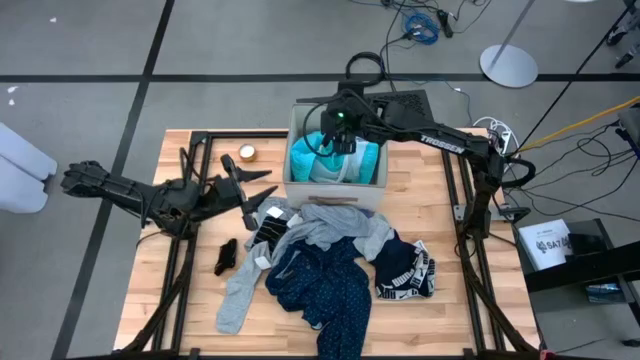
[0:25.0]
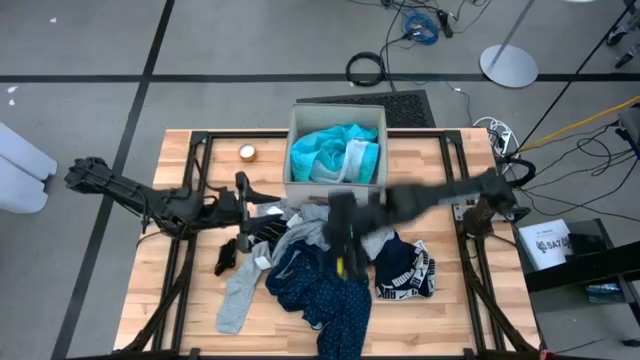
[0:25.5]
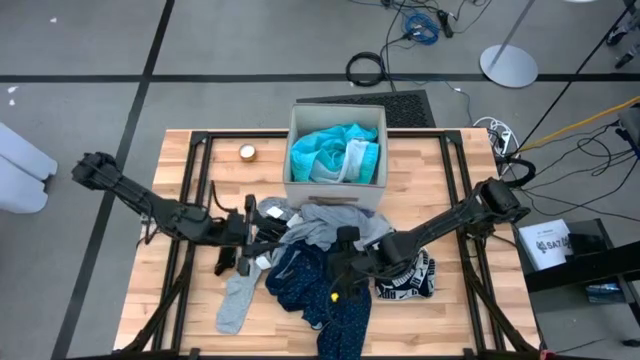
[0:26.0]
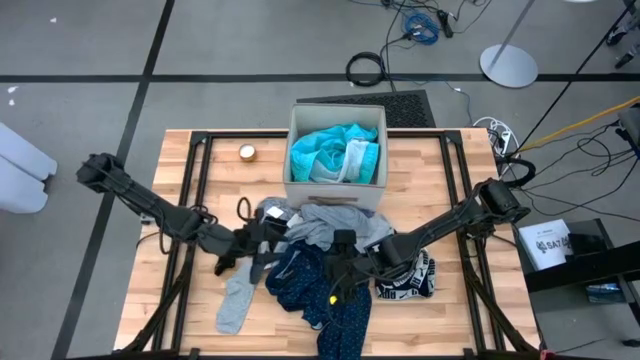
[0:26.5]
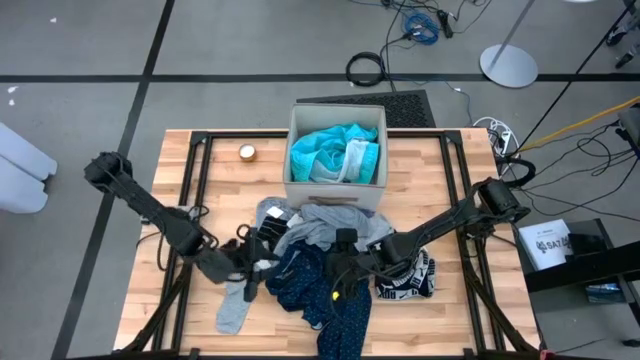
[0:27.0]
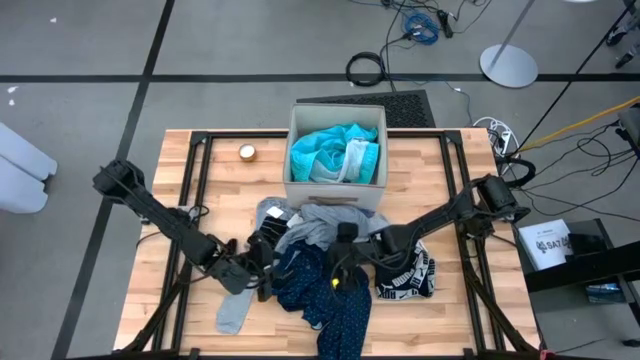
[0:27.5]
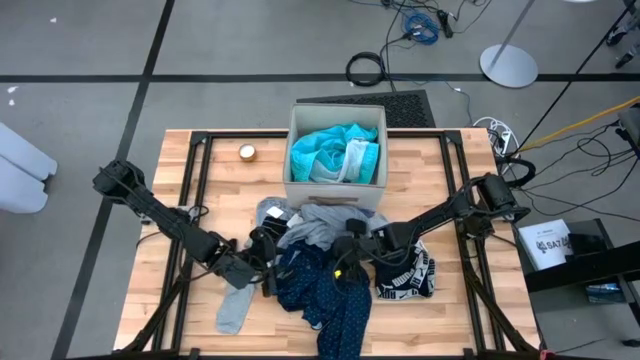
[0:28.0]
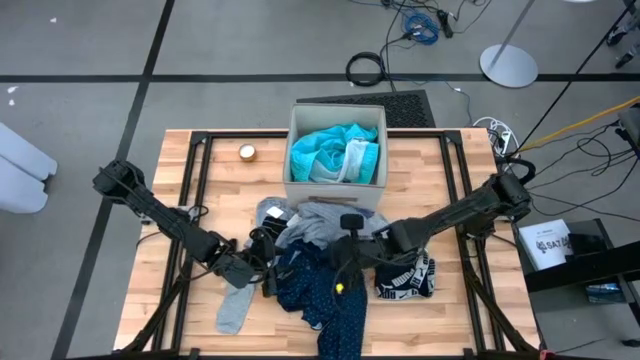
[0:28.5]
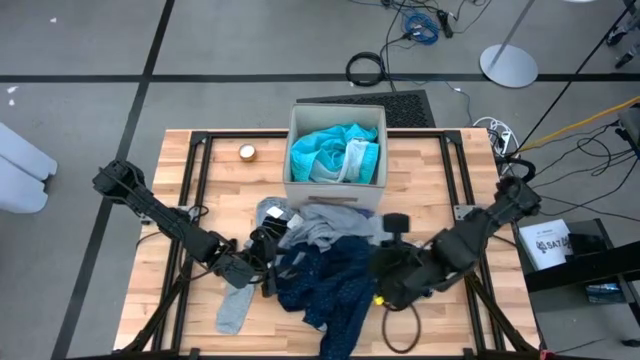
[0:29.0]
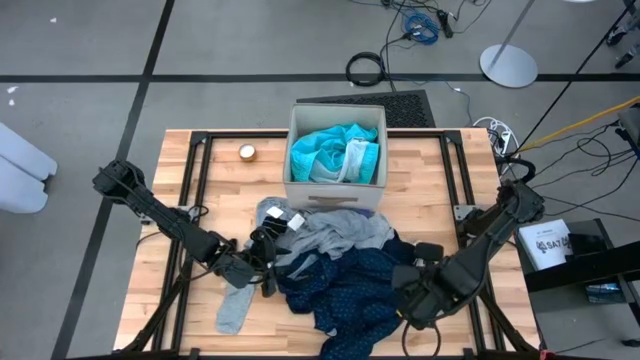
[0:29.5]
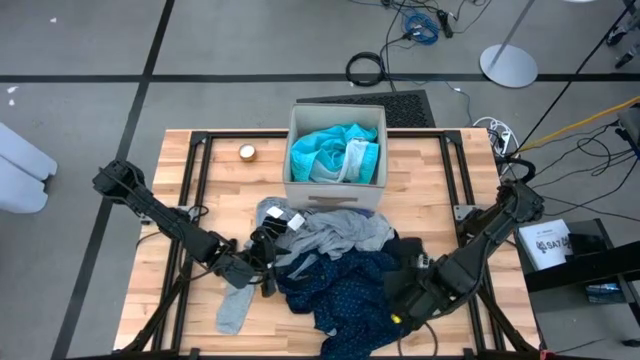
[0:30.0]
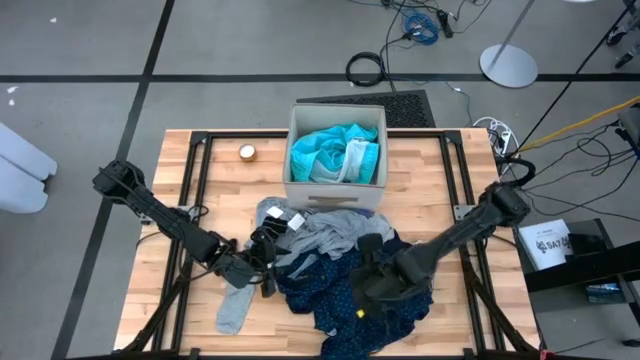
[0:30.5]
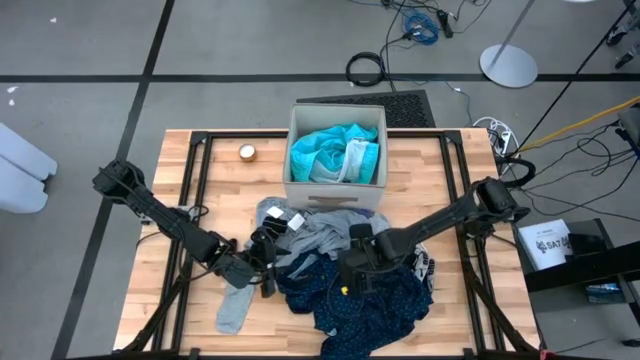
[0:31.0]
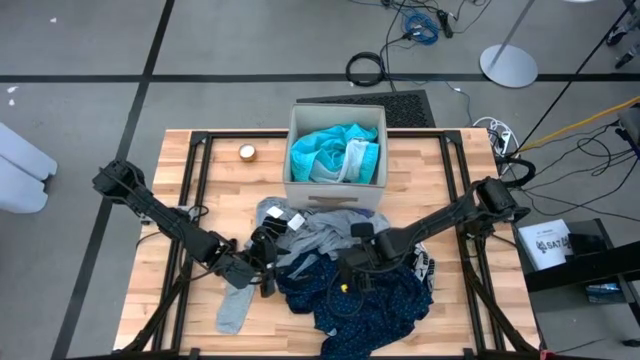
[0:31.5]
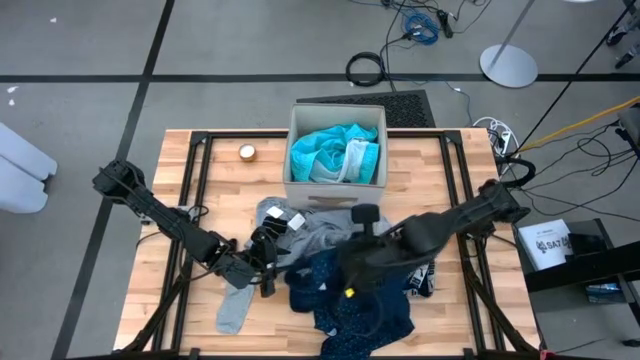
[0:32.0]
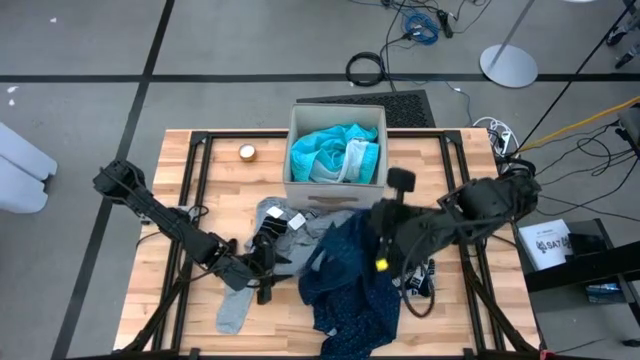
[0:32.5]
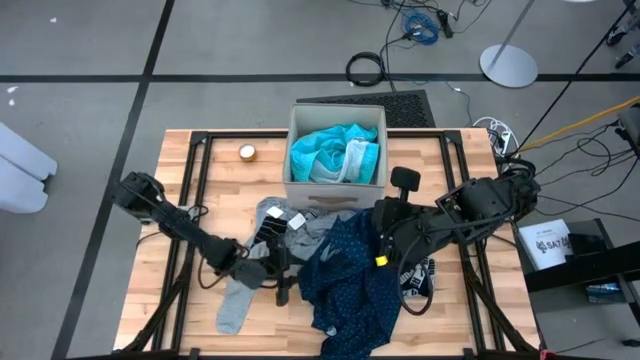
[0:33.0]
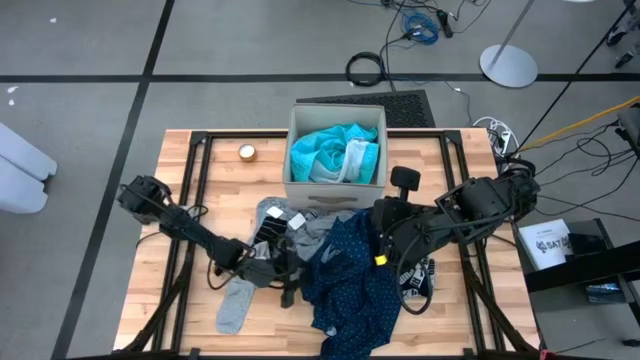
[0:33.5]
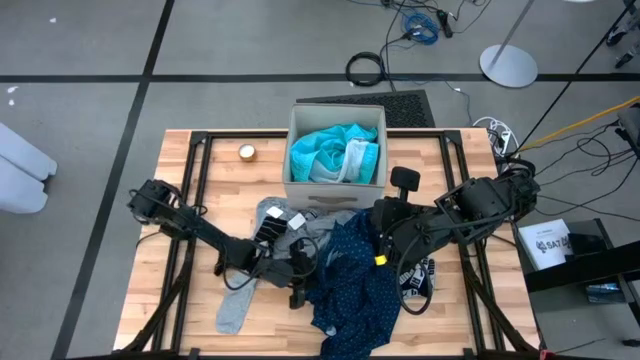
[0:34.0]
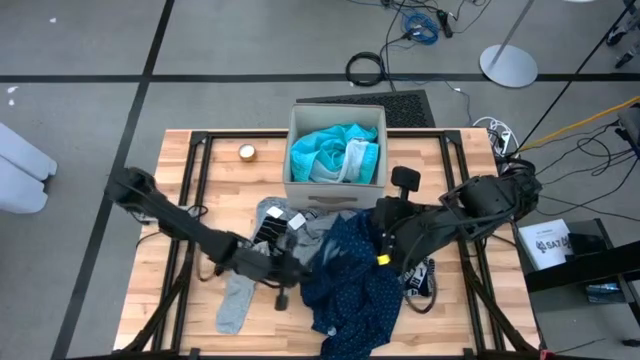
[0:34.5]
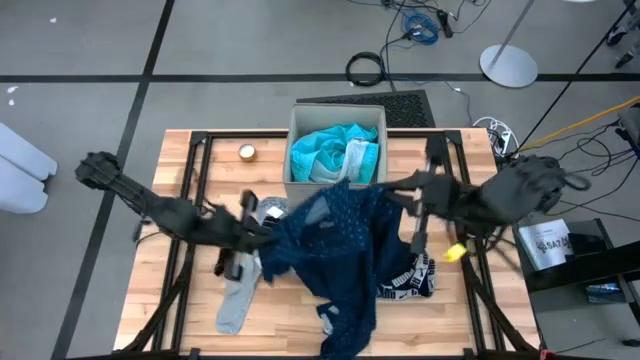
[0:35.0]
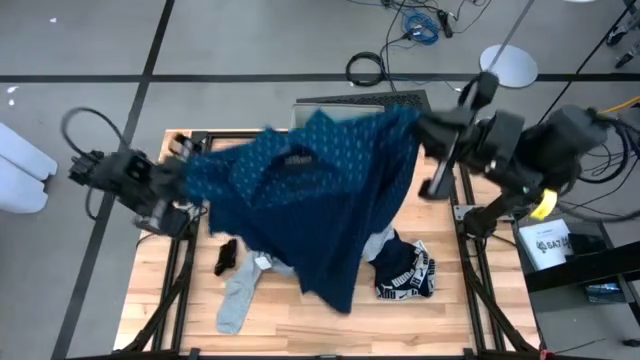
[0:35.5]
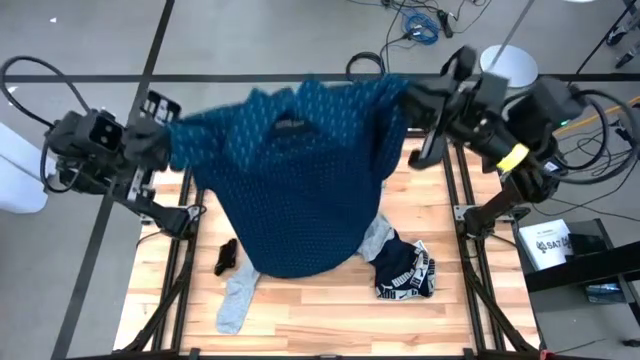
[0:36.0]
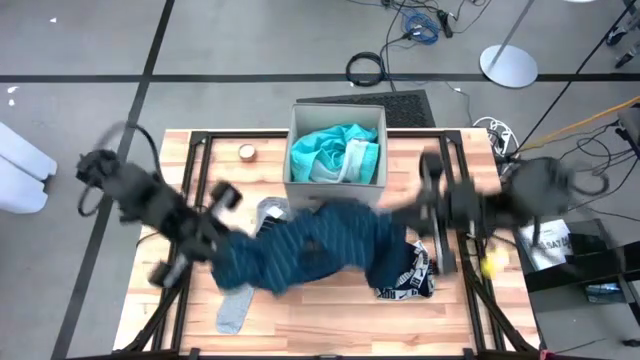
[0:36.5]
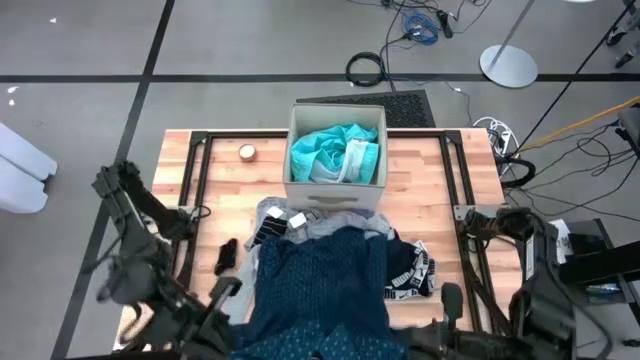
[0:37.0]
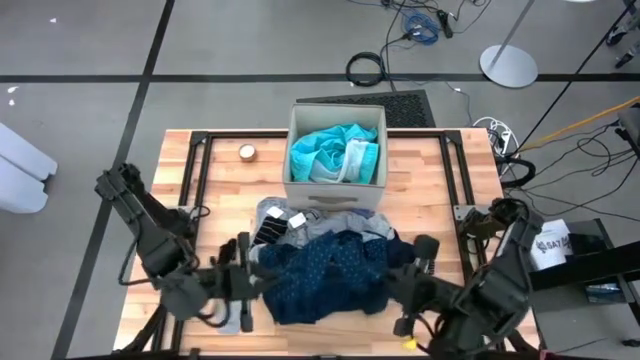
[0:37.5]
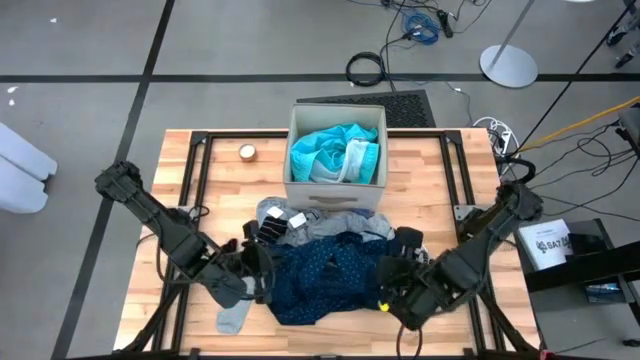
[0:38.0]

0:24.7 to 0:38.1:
Task: Sort clothes
Put the blue polo shirt into the laundry organizer

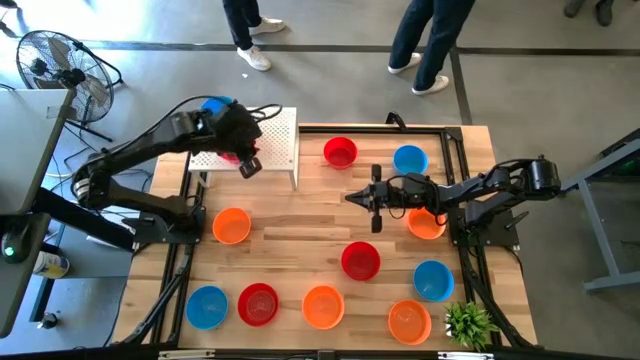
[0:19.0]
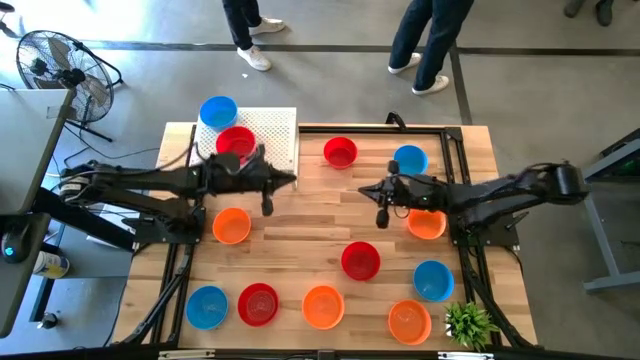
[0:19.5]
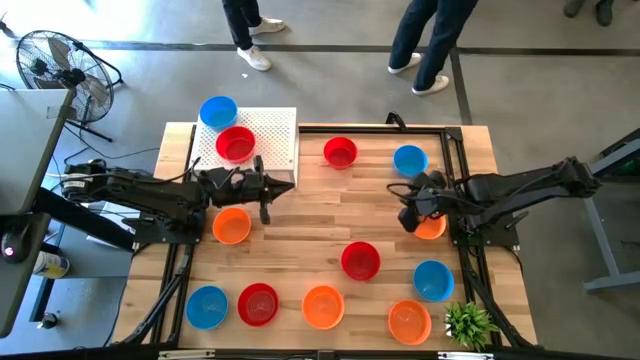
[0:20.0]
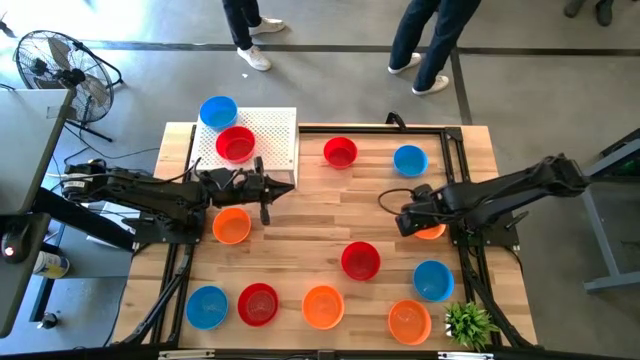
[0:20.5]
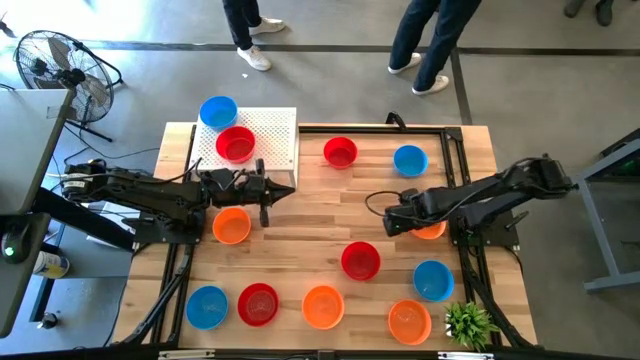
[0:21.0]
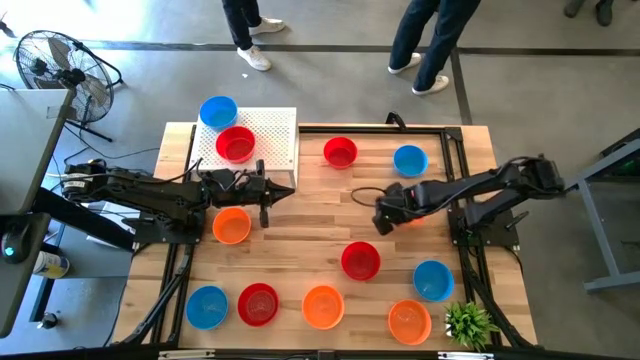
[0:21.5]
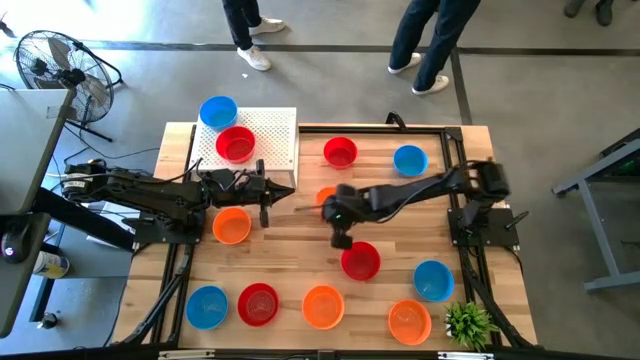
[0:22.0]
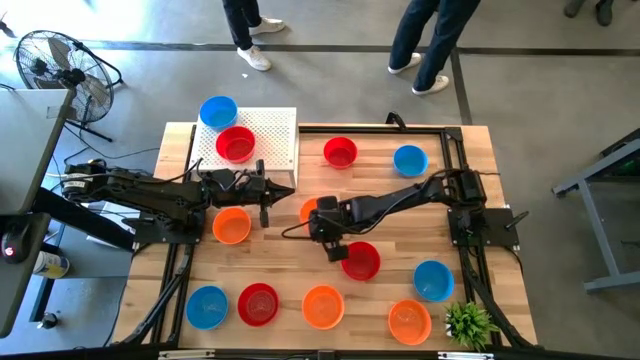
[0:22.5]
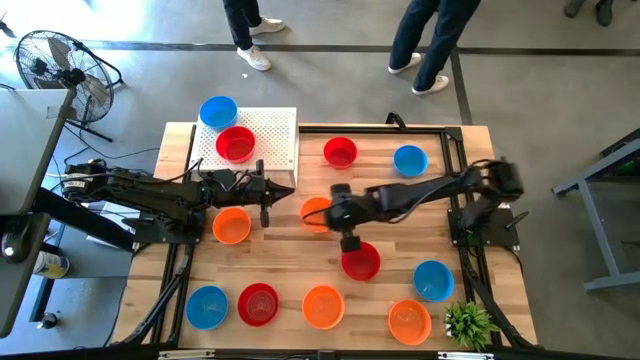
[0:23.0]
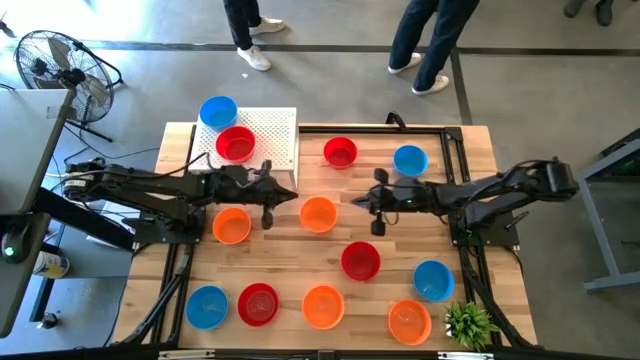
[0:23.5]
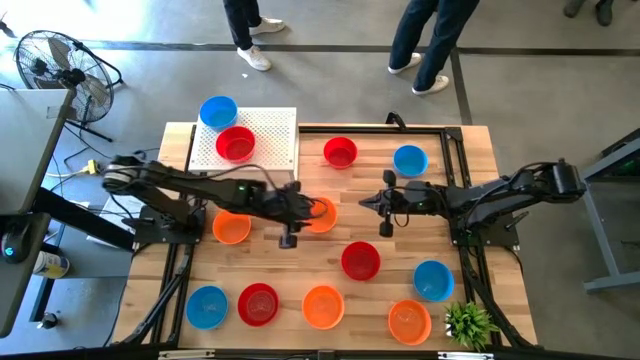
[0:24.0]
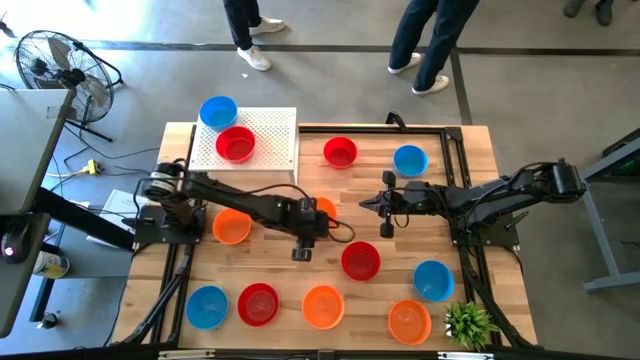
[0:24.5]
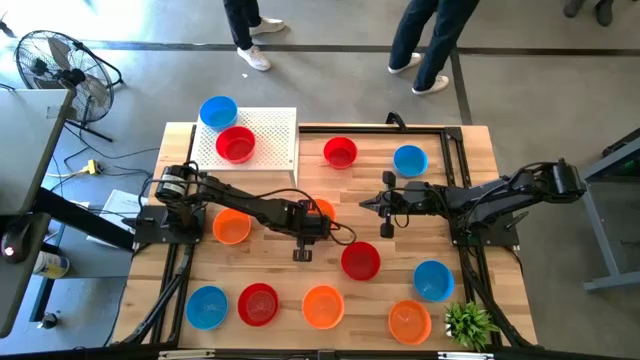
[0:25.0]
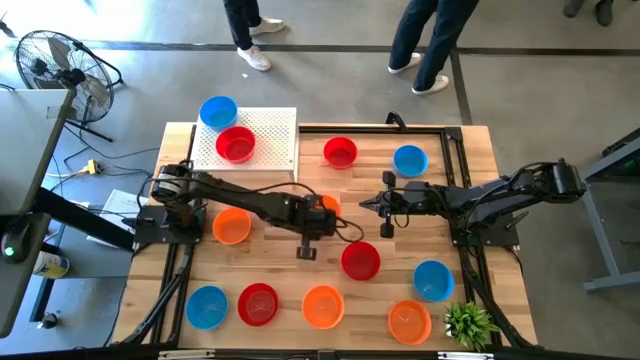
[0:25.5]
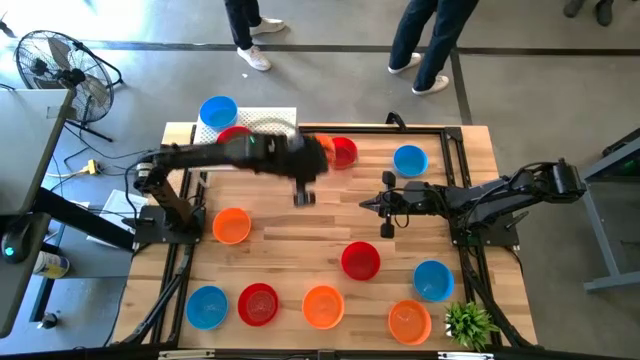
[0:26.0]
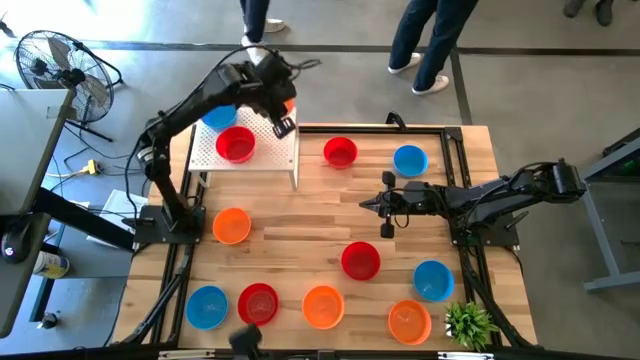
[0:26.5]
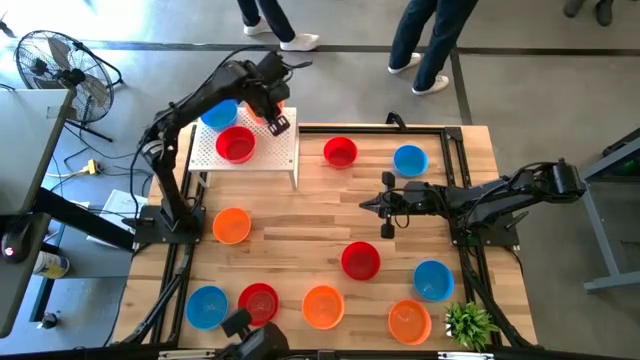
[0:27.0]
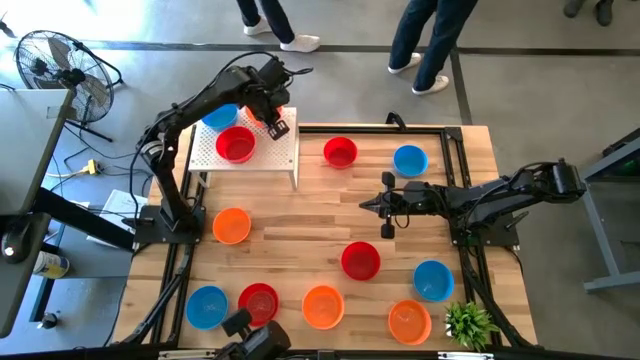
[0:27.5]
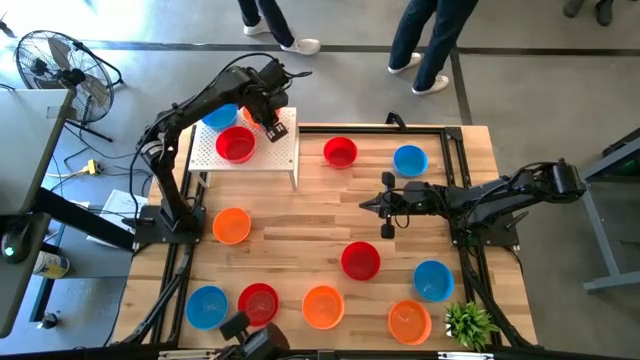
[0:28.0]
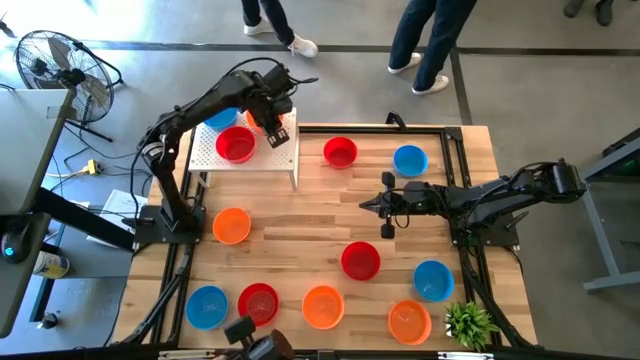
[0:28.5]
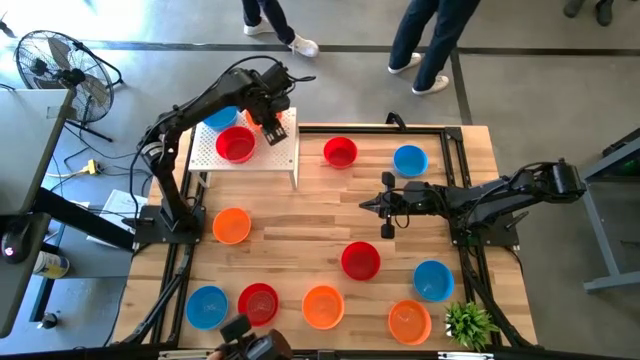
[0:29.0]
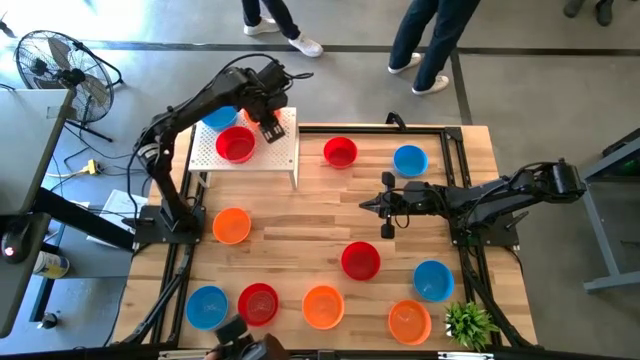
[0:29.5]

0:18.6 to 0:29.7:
Task: Pick & Place Mini bowls
Put the orange bowl on the shelf
